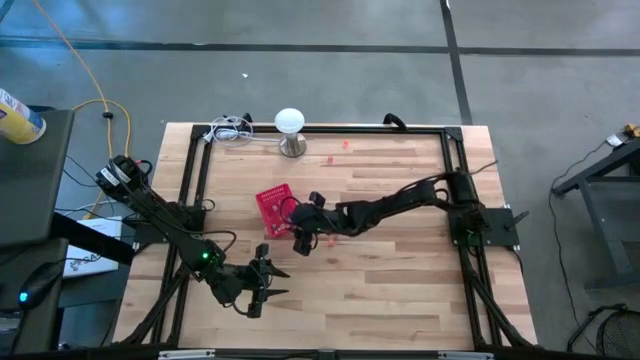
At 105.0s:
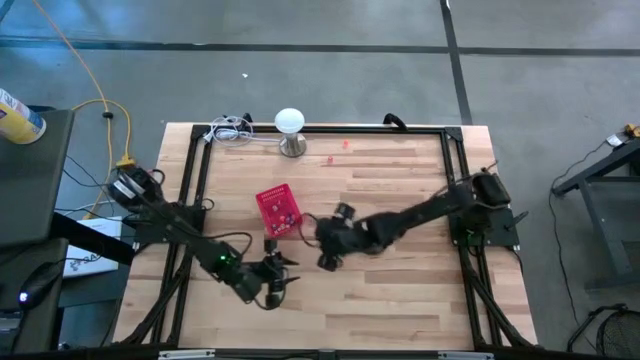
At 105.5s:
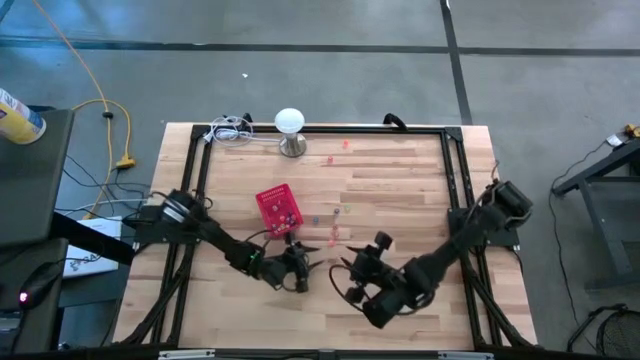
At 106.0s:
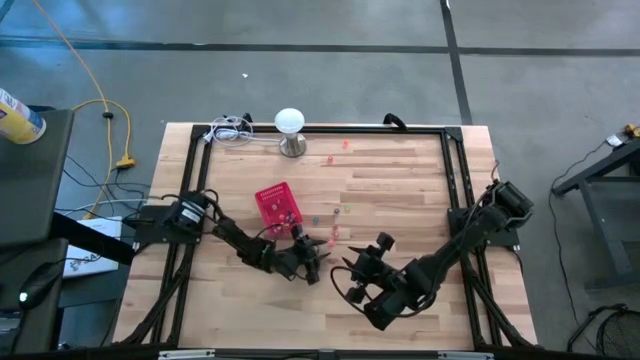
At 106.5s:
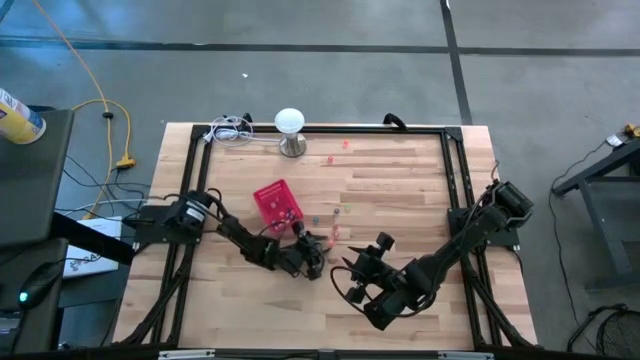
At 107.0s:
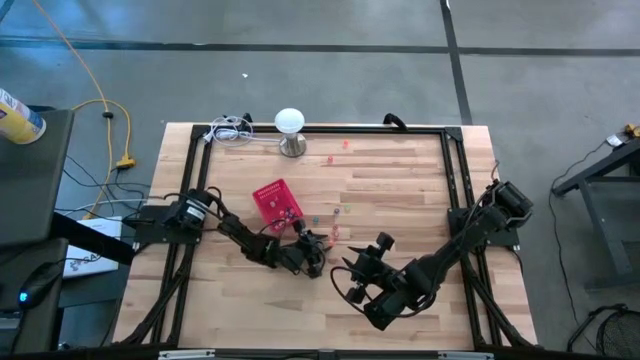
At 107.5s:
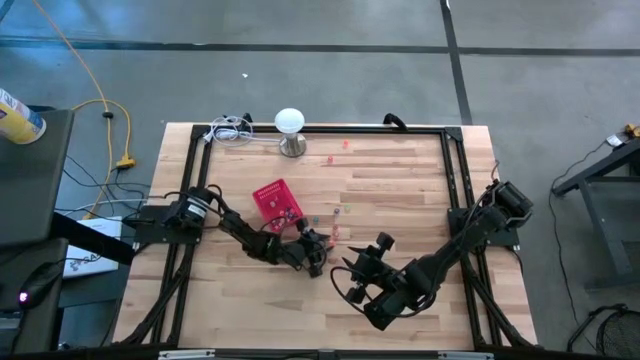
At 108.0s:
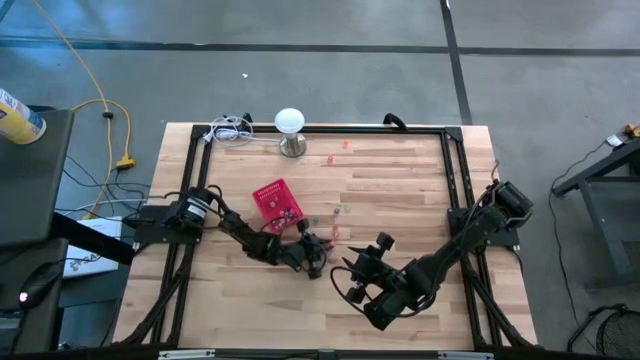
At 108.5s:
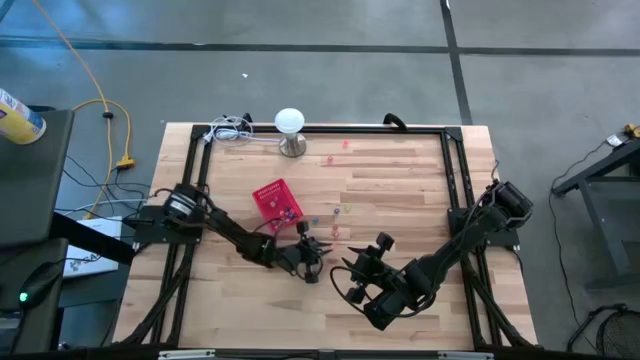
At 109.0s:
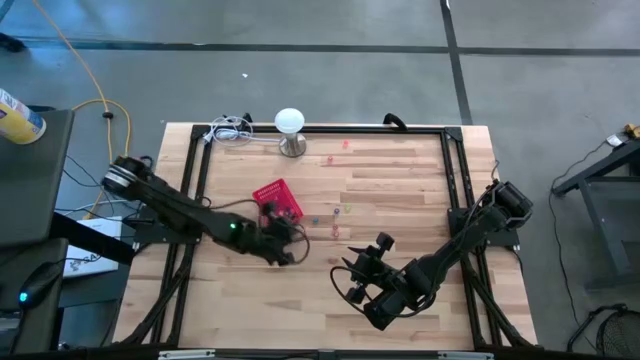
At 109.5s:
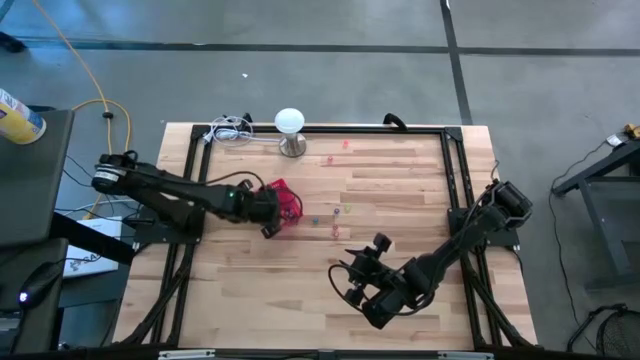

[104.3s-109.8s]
Task: Pick & Place Dice
Put the orange die into the red basket

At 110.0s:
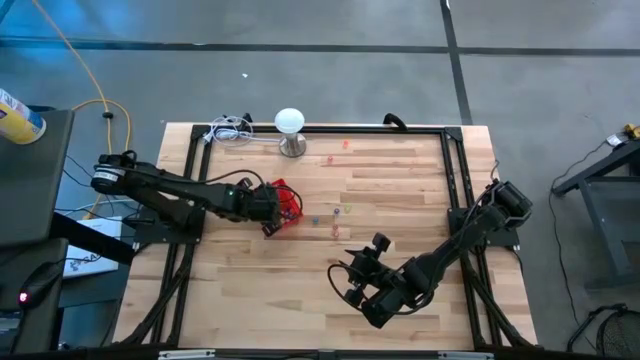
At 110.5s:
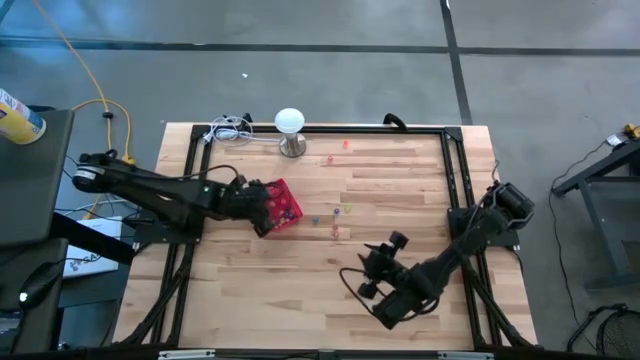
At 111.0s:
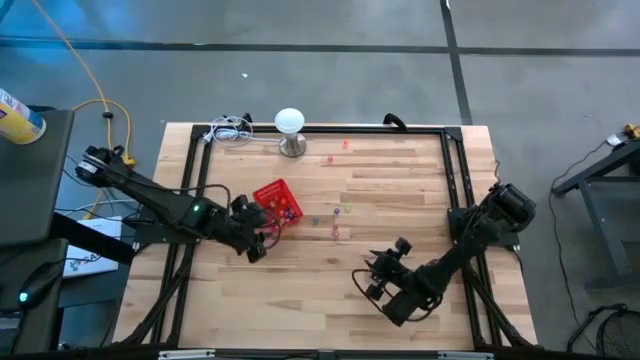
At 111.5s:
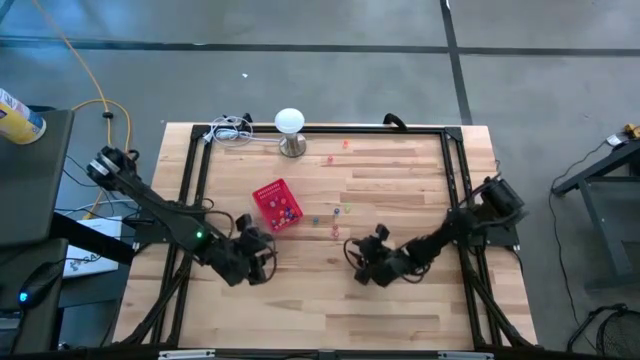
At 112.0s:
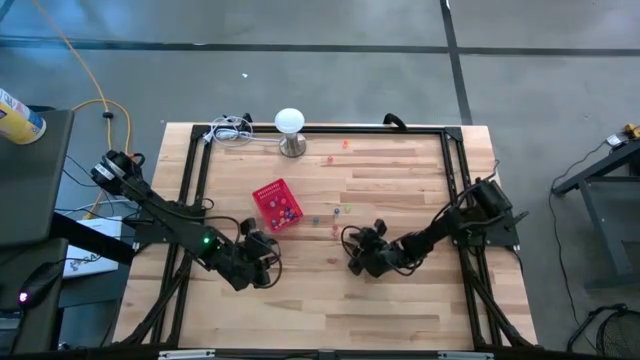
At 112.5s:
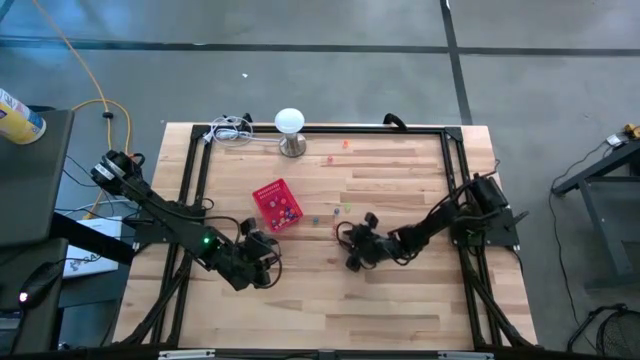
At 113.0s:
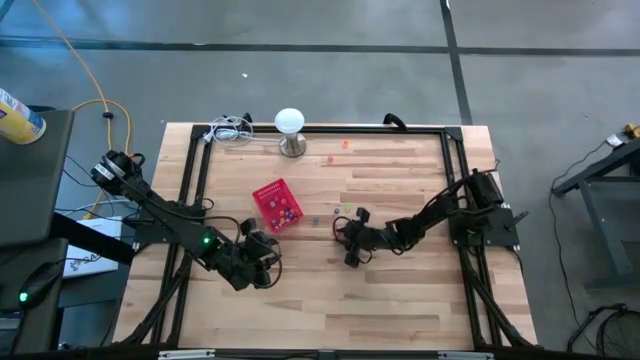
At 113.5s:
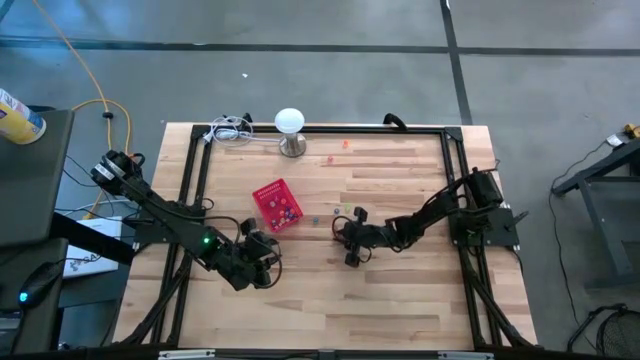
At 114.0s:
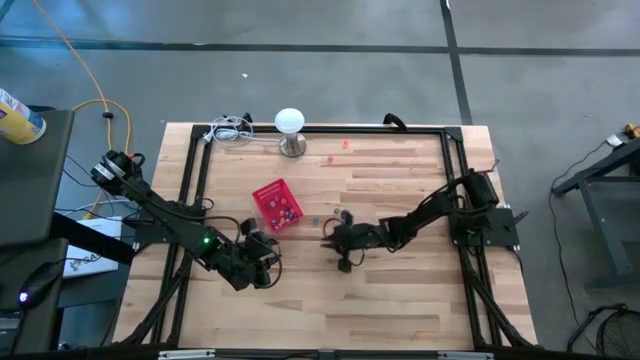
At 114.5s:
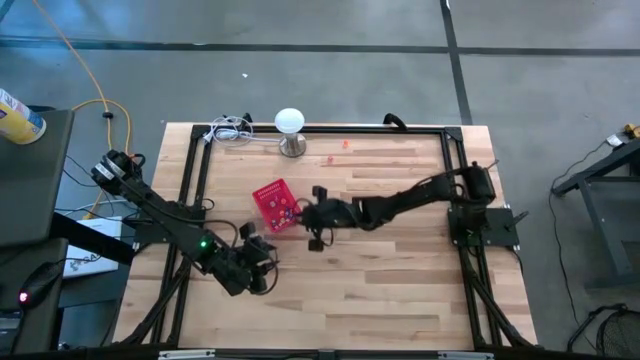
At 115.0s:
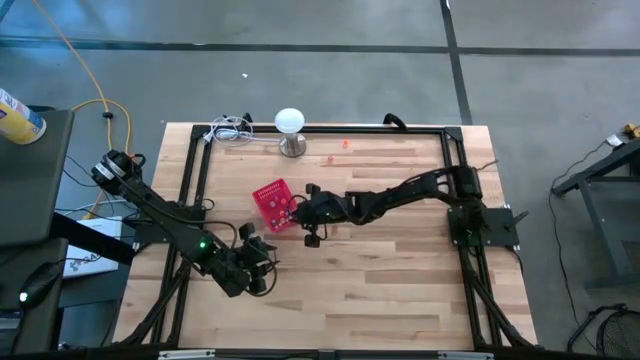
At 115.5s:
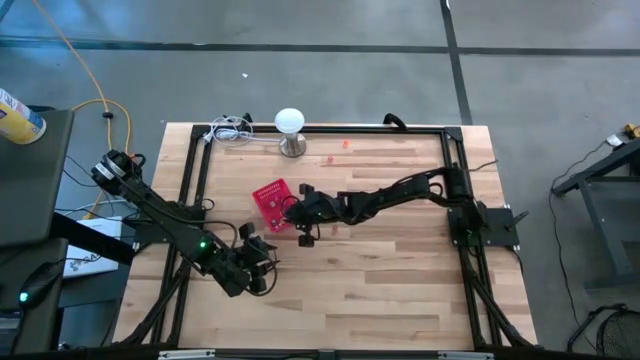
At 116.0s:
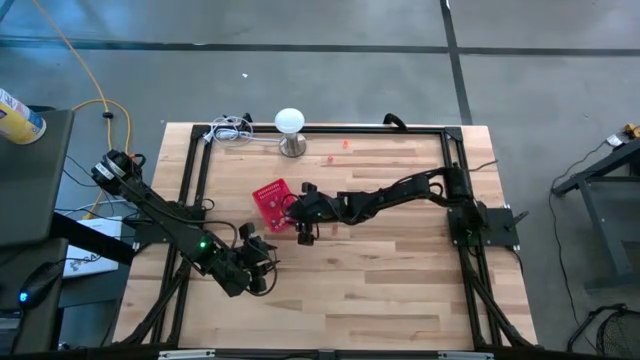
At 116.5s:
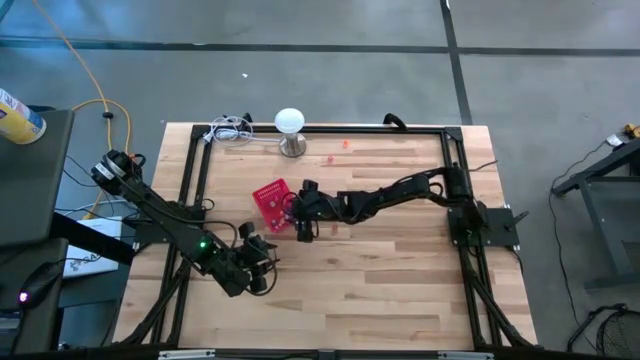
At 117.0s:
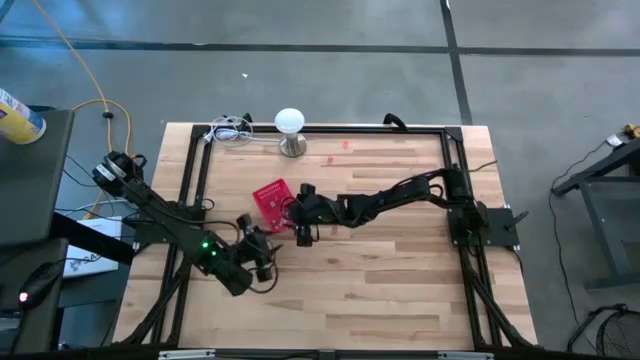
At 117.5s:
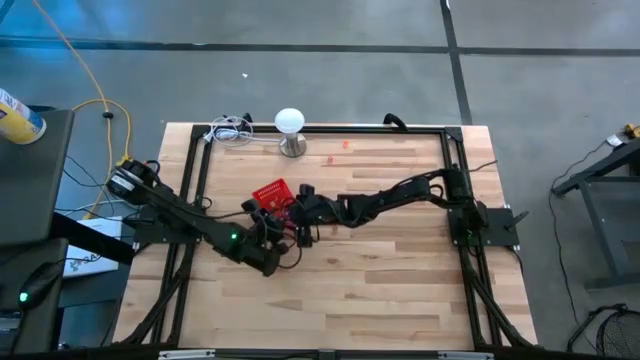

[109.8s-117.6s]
Put the pink die into the red basket

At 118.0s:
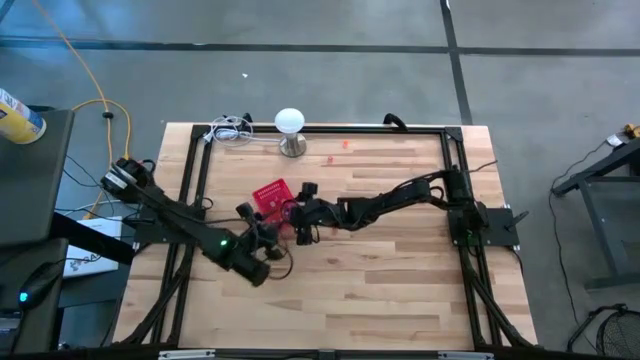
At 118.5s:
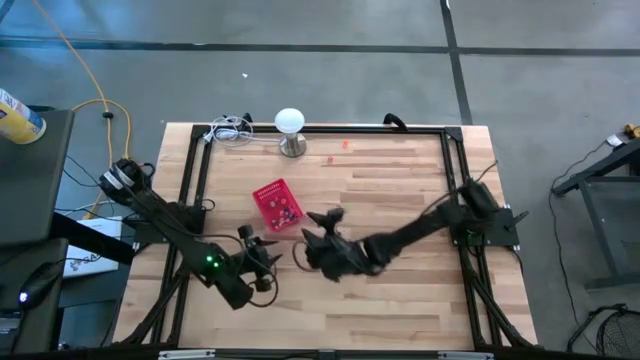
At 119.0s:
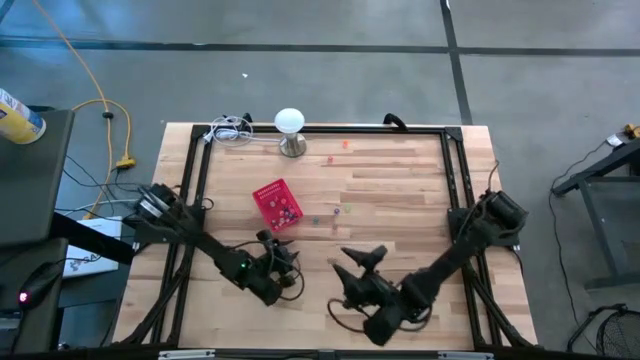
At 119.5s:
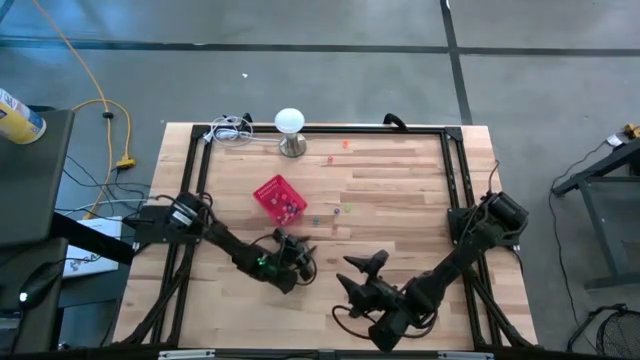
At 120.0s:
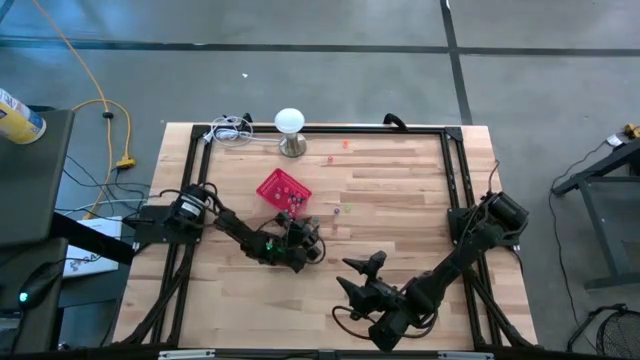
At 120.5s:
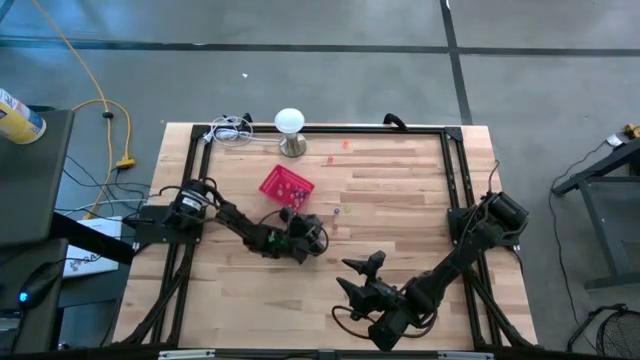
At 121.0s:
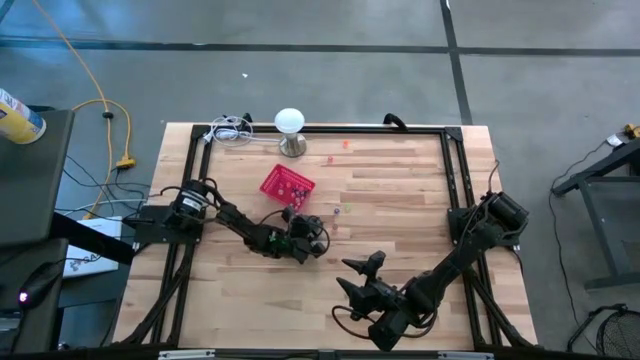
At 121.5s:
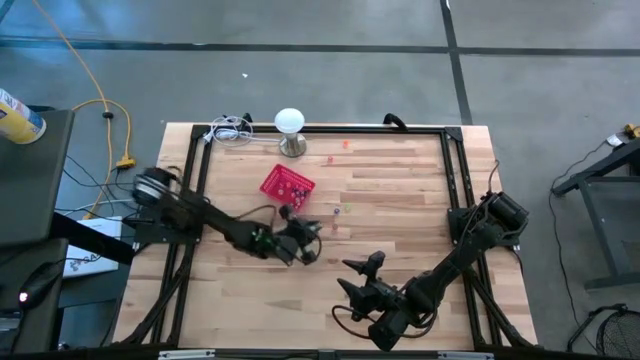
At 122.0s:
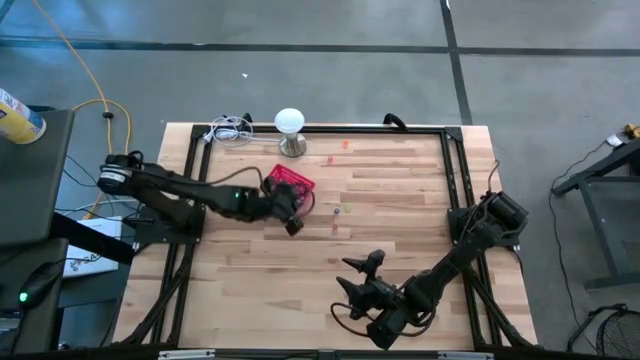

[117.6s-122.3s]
Put the light blue die into the red basket

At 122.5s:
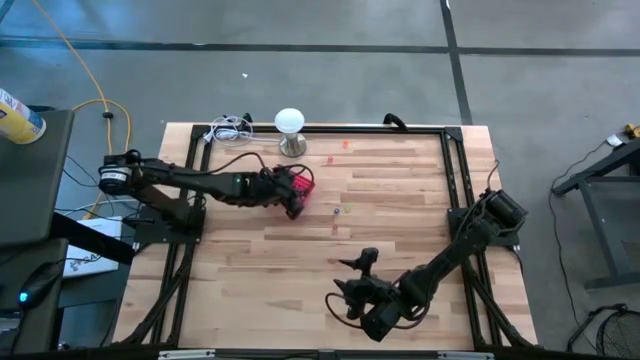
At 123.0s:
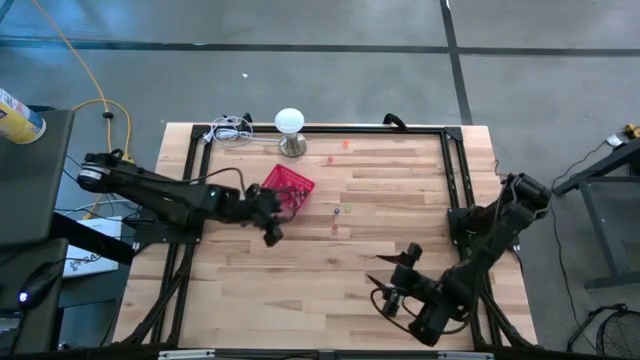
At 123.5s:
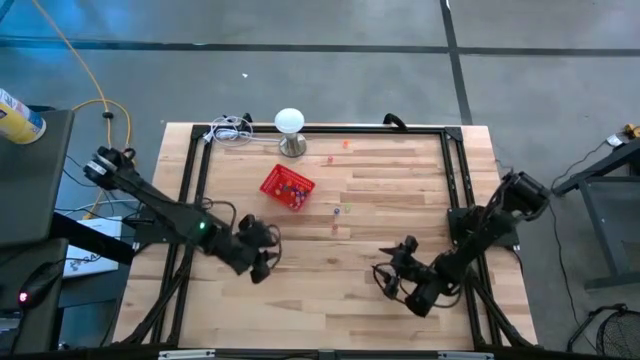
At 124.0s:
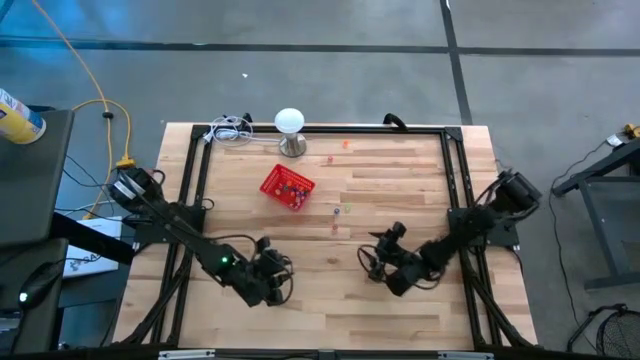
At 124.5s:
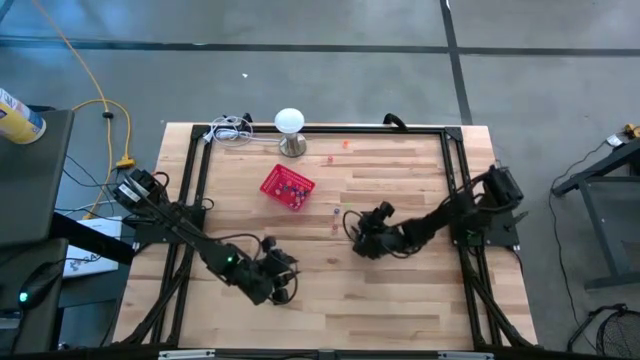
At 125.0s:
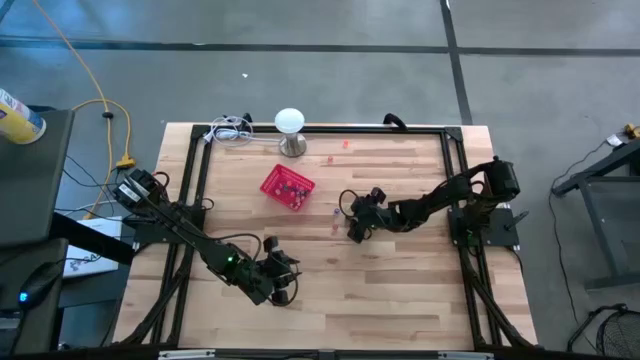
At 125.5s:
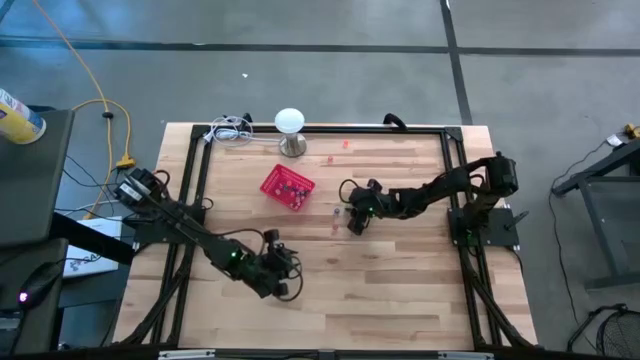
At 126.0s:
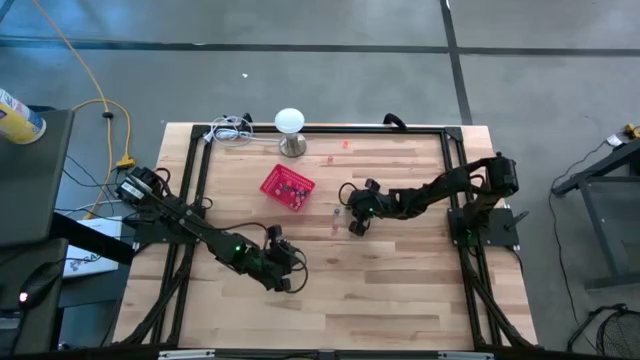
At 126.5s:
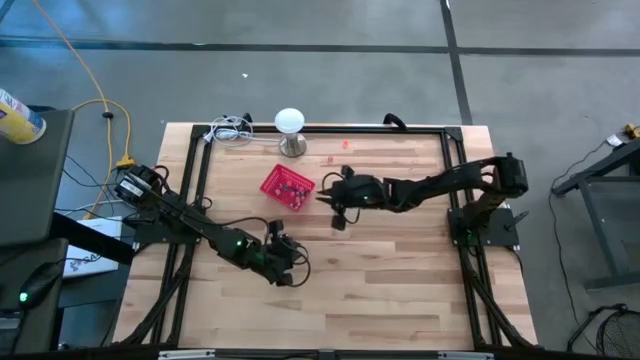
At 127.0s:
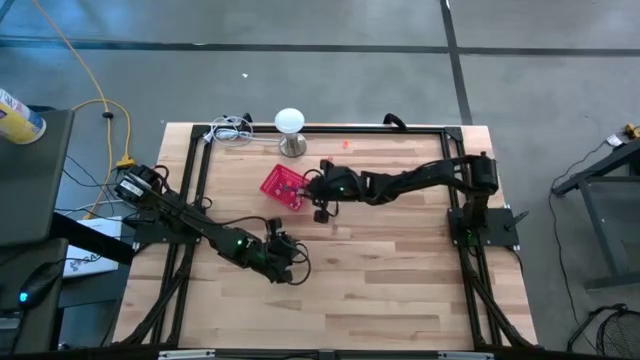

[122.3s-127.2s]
Put the yellow die into the red basket
